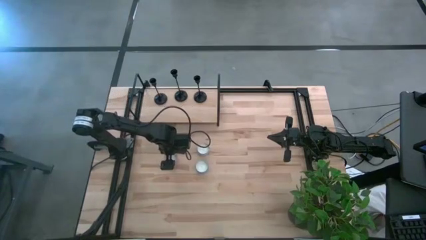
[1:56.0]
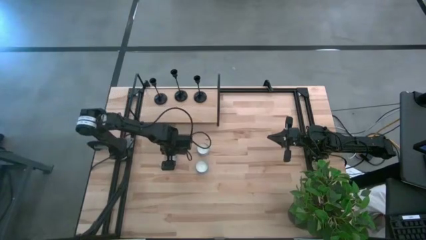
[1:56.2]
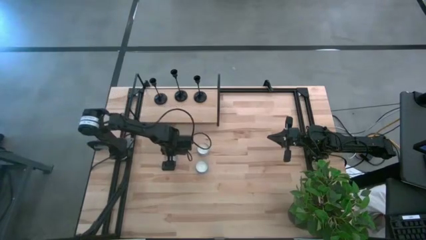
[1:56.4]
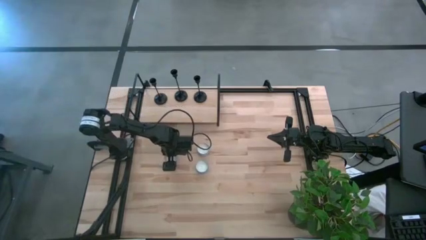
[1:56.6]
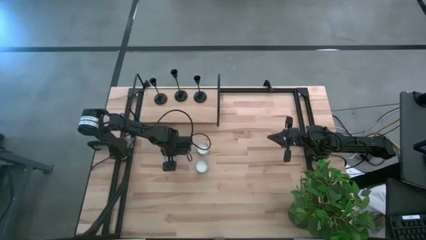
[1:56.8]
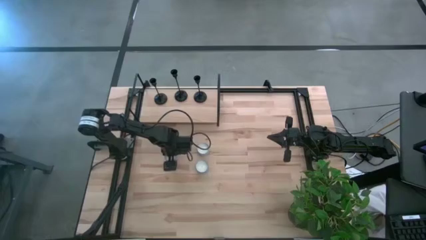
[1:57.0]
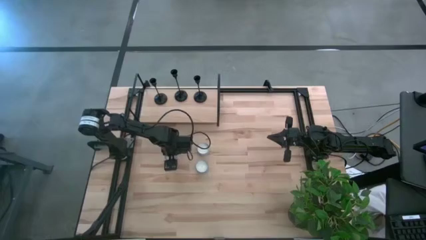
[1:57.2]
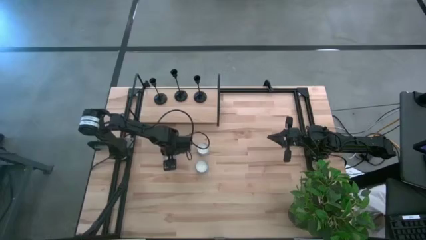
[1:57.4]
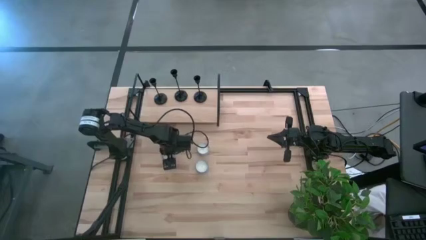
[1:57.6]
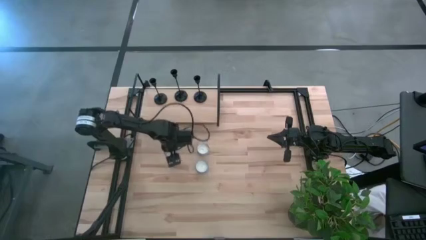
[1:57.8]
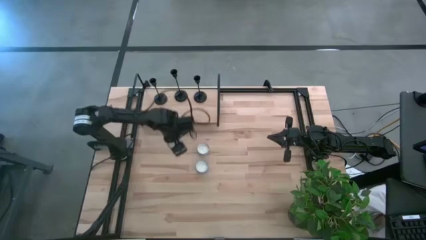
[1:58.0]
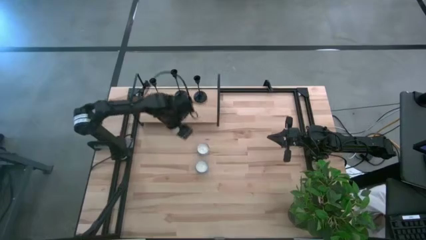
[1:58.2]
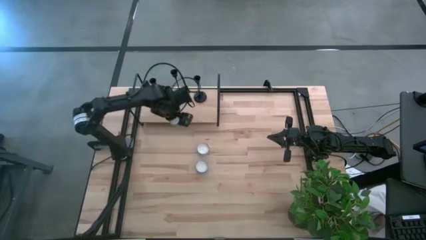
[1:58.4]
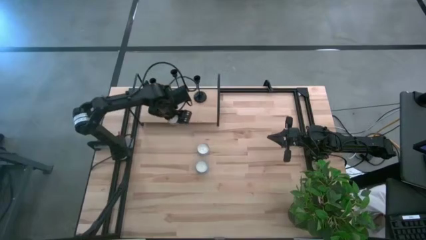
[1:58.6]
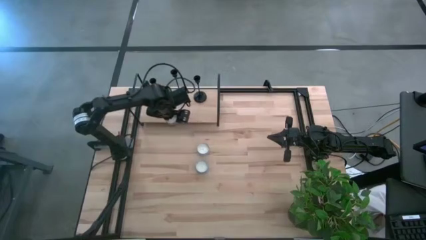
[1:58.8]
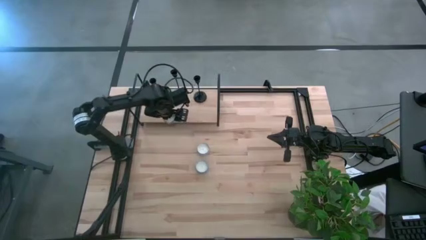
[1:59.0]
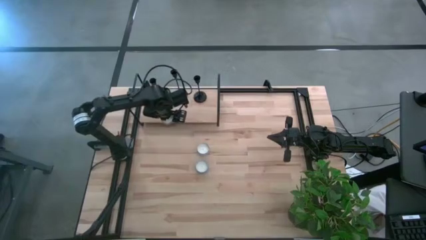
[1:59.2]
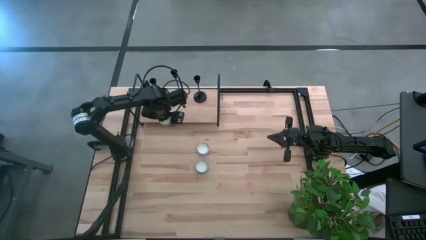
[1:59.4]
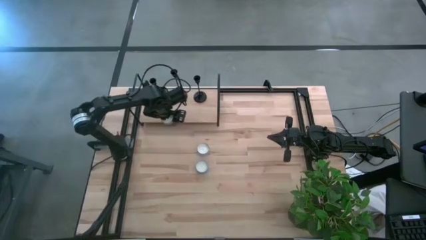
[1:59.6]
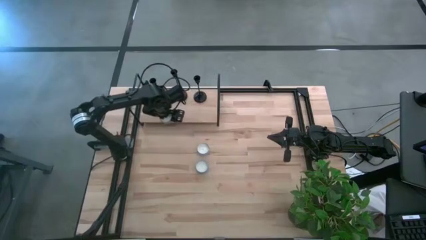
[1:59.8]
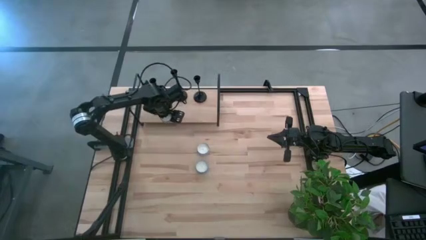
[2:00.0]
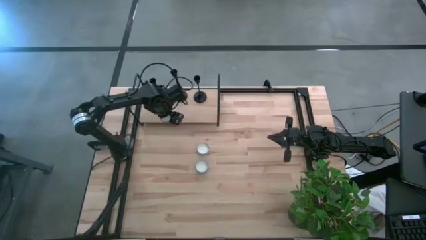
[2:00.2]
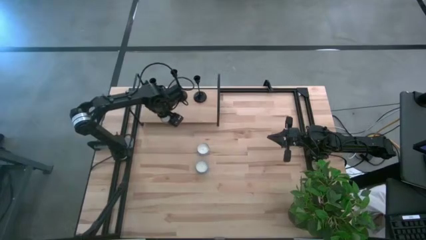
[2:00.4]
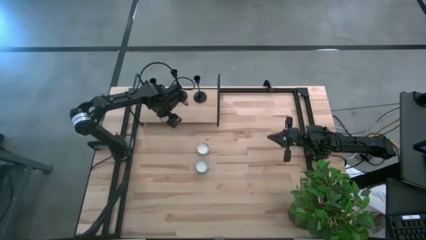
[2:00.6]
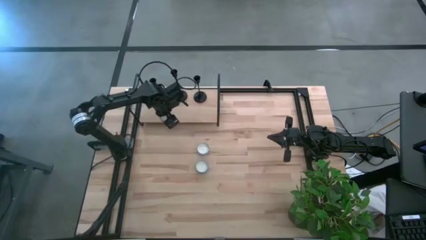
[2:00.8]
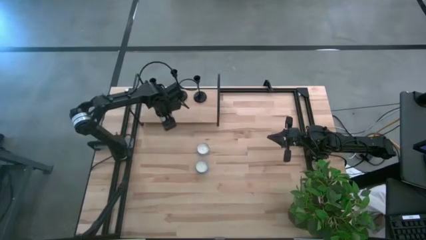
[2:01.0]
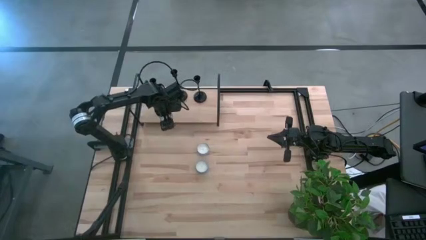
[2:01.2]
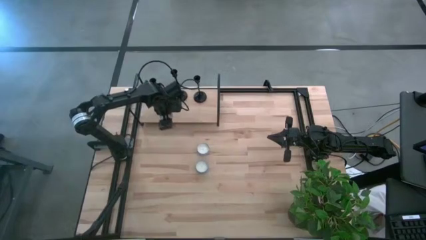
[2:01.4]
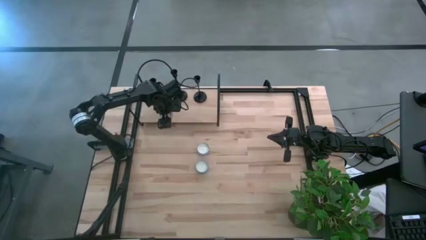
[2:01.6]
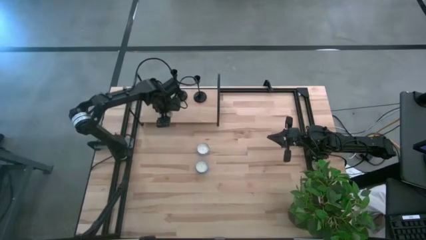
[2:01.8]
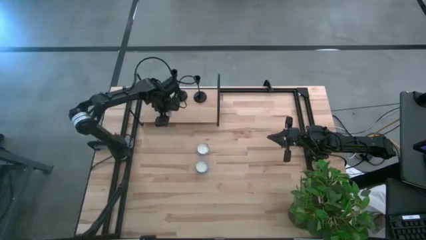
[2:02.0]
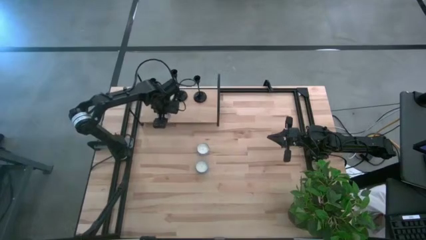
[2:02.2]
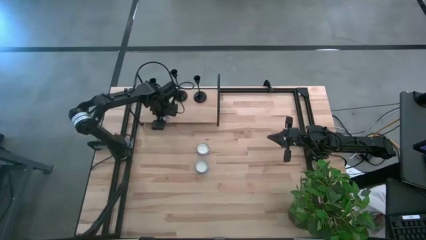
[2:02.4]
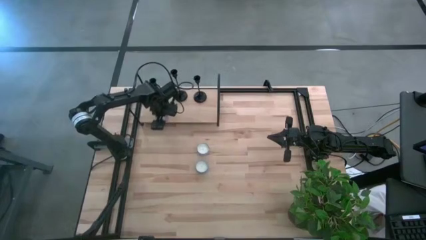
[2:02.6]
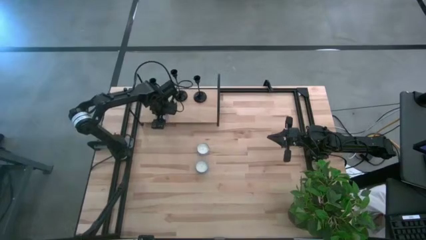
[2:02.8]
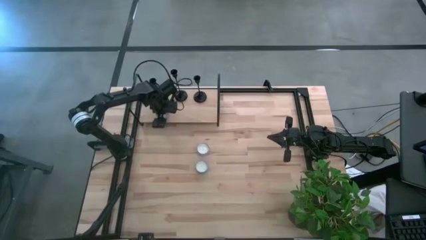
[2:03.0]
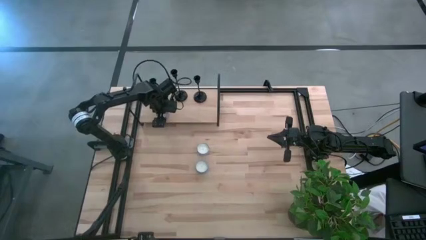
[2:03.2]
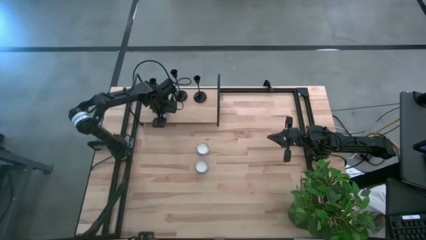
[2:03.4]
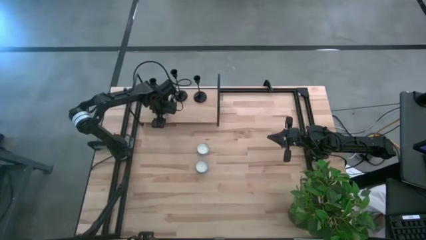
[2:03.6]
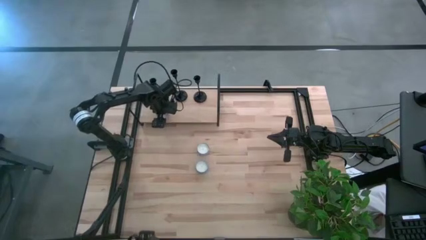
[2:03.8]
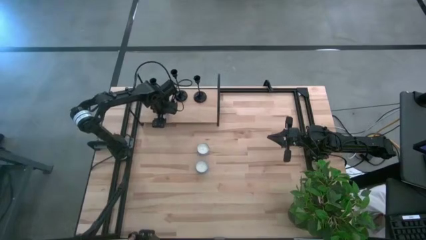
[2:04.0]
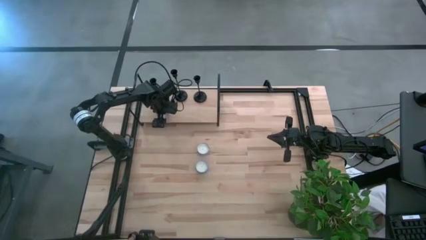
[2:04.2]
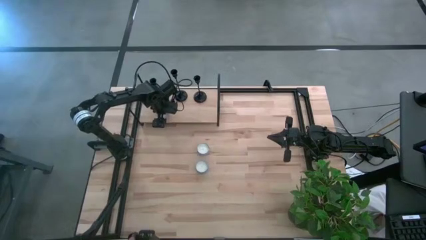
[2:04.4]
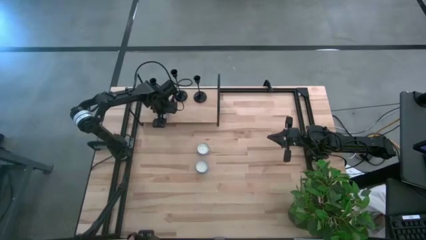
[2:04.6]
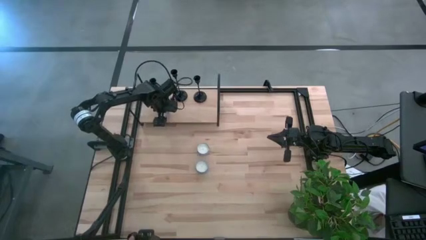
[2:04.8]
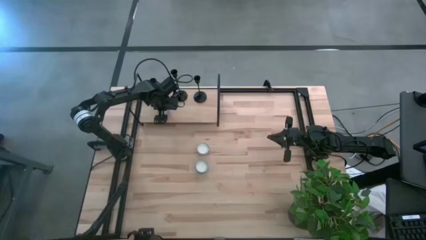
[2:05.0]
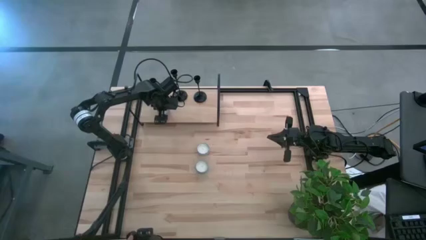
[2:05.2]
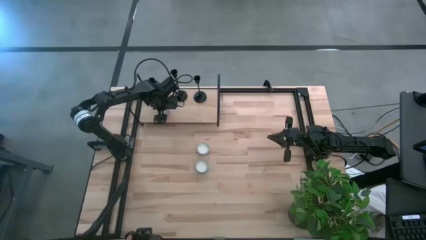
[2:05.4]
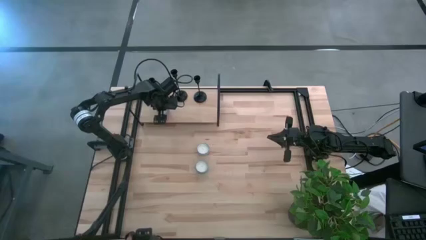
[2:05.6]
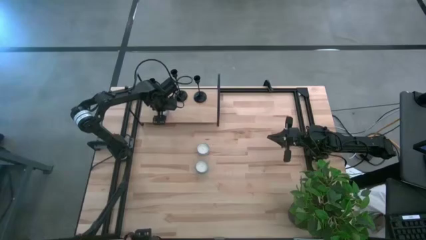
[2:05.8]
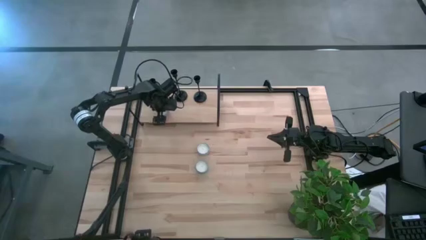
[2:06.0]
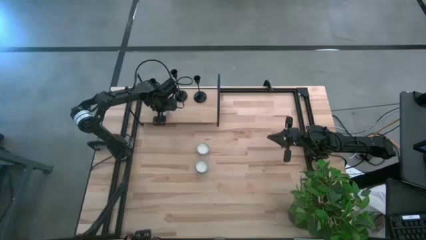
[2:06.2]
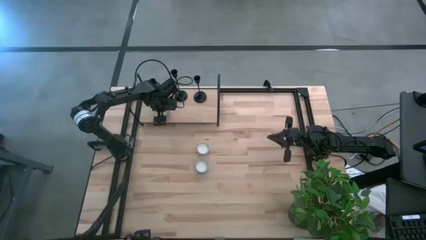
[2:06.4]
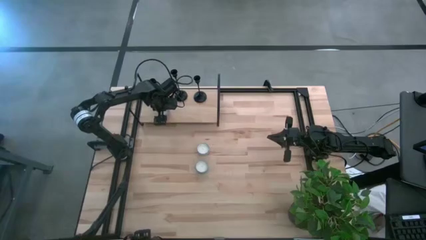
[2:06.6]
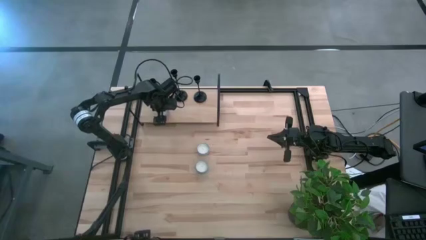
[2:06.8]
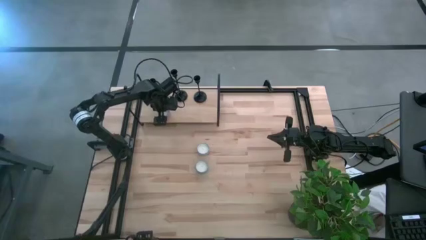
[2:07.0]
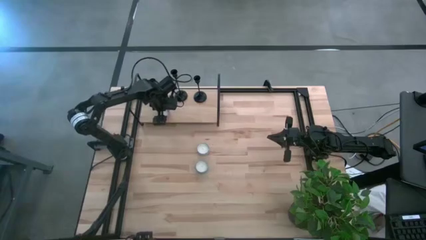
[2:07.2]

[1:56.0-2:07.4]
Task: Pick & Place candle stick holders
Put the pink scented candle on the shelf

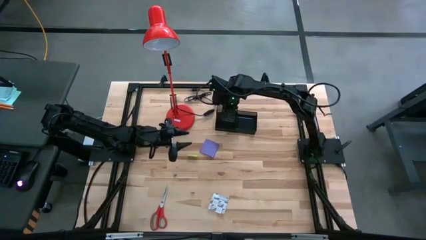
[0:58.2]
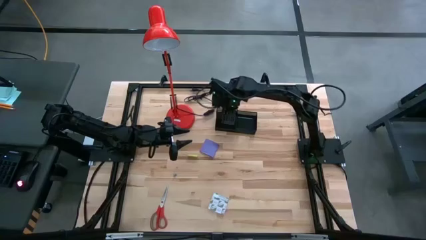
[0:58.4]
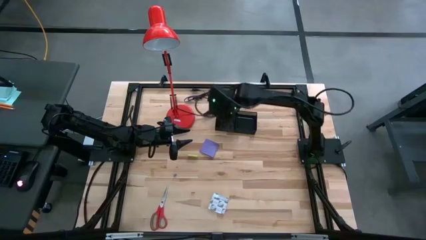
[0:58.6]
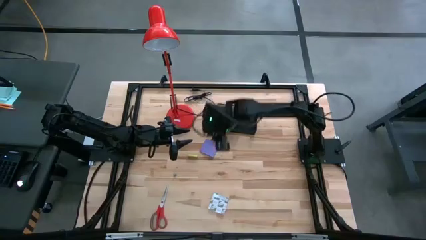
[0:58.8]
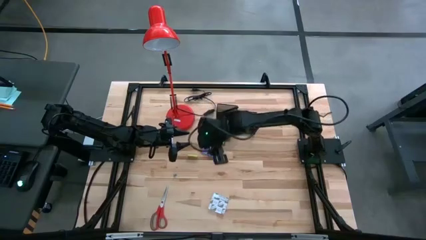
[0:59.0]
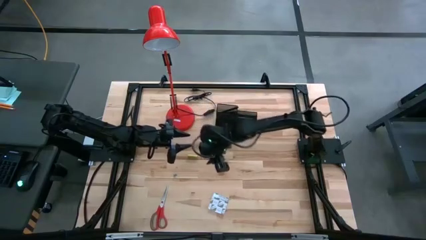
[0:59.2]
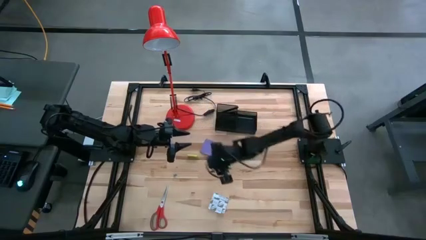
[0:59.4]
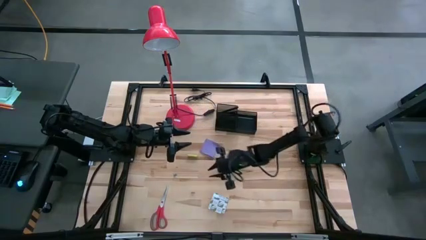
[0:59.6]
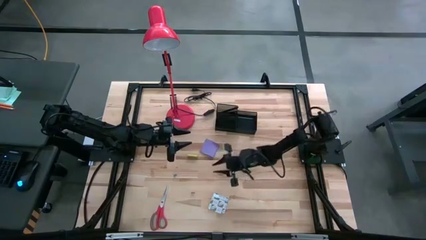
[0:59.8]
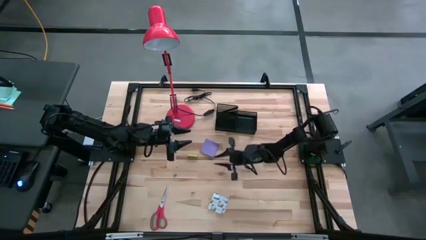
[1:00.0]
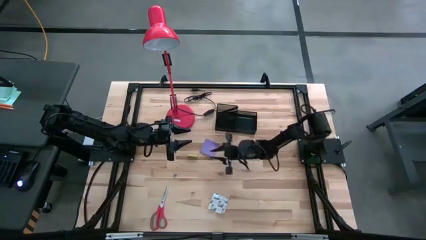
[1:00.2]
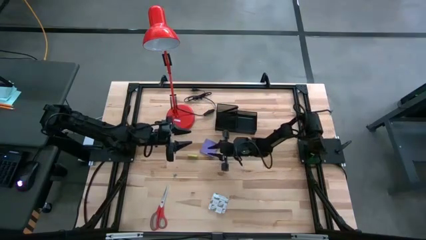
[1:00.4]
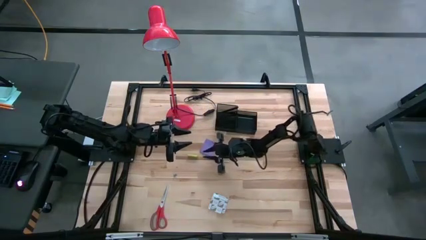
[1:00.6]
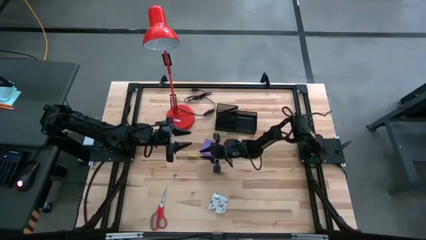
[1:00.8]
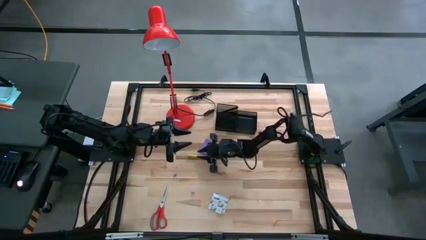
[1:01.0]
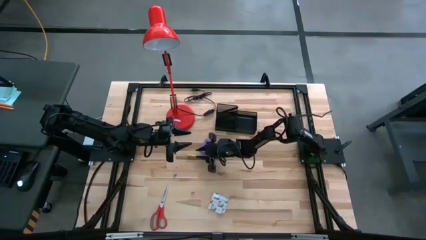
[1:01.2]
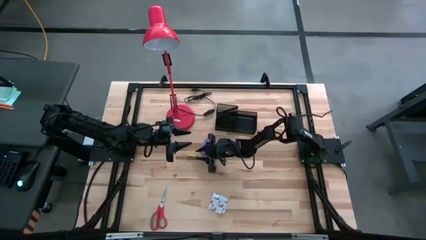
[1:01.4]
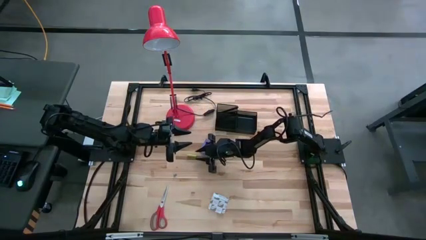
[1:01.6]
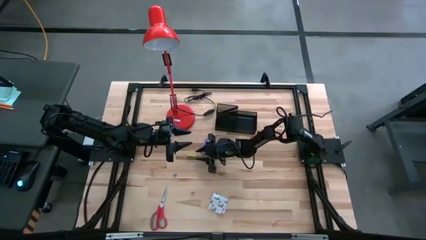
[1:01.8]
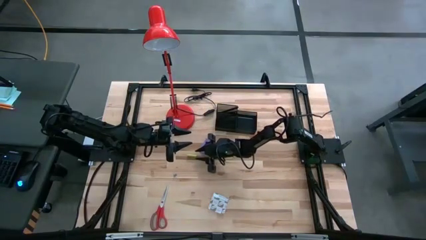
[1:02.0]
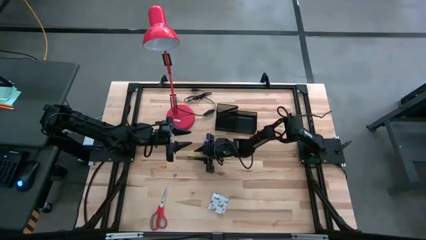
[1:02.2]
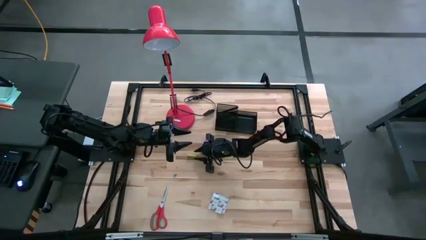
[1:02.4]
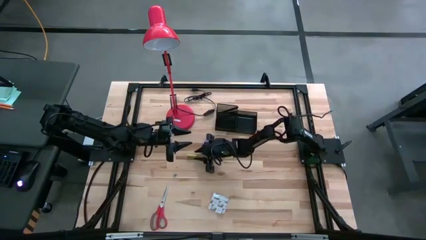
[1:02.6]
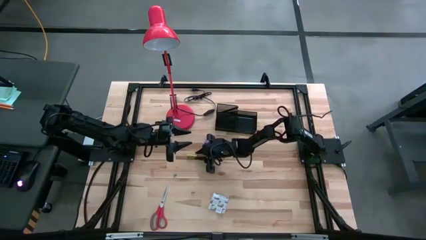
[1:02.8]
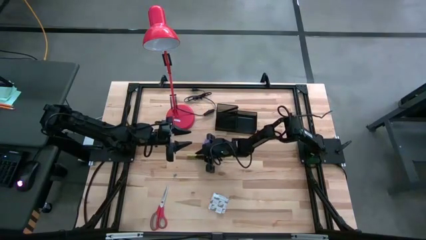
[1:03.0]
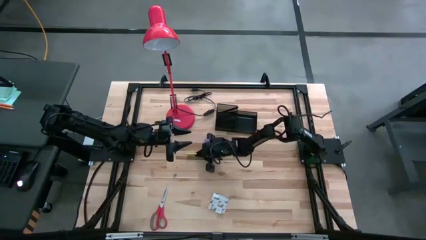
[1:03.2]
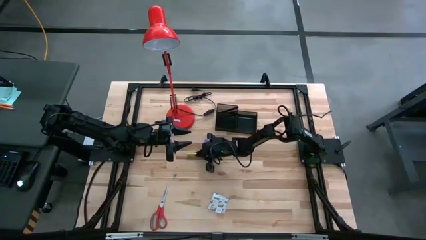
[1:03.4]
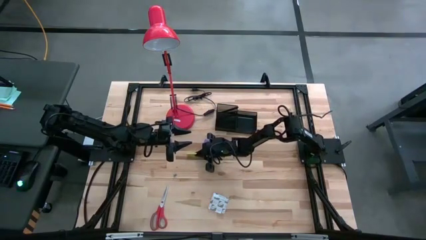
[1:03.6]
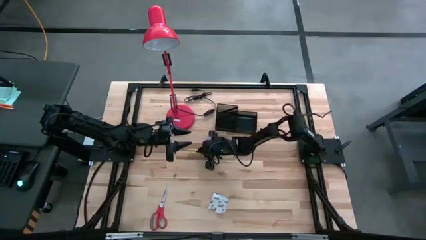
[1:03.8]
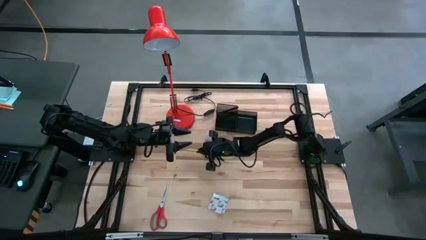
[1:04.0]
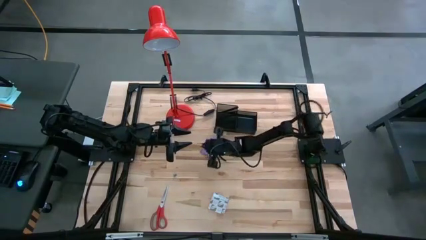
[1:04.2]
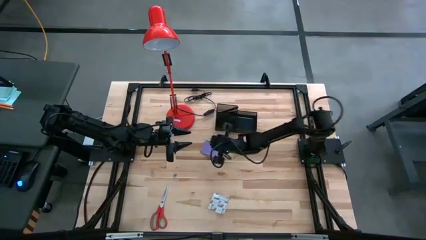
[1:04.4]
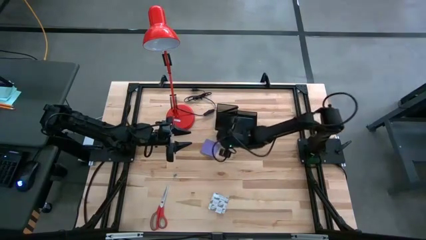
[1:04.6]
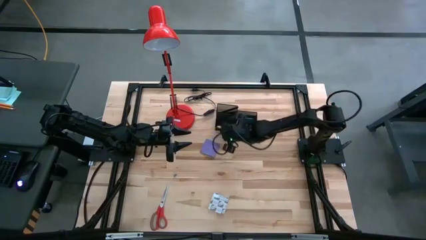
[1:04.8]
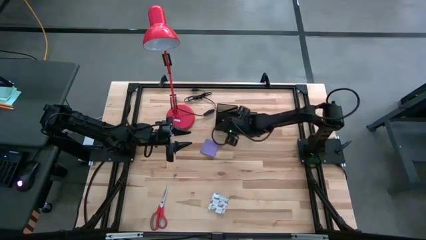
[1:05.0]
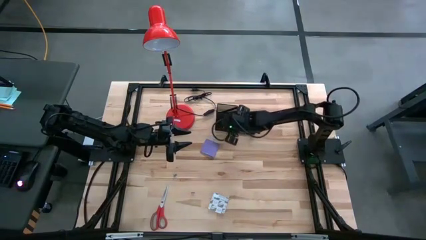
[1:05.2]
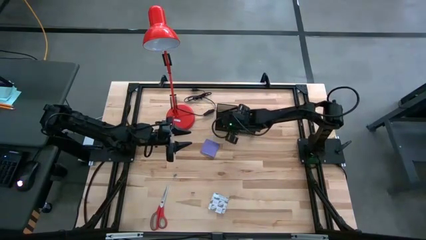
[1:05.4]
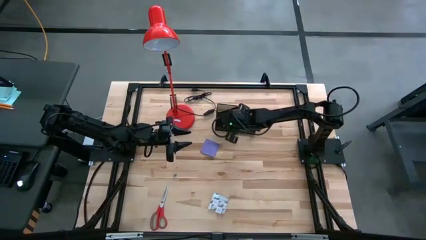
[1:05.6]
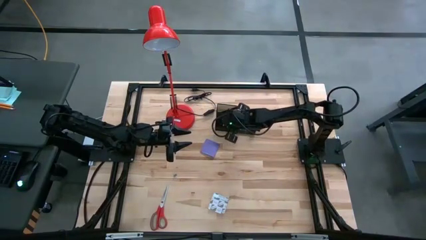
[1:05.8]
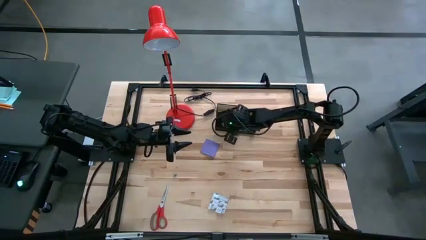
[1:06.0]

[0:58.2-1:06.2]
Task: Pick and place office supplies into organizer
Put the yellow eraser into the black desk organizer
